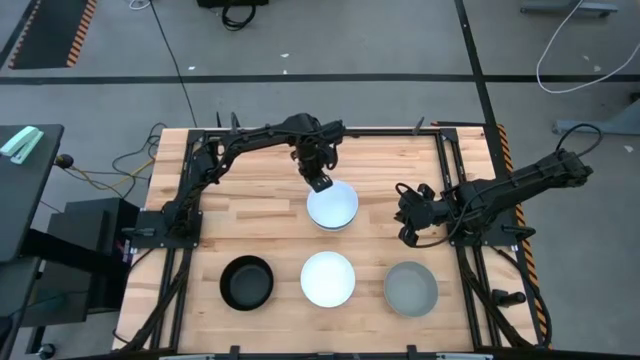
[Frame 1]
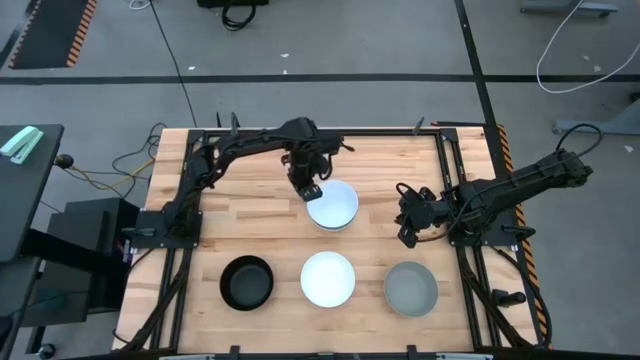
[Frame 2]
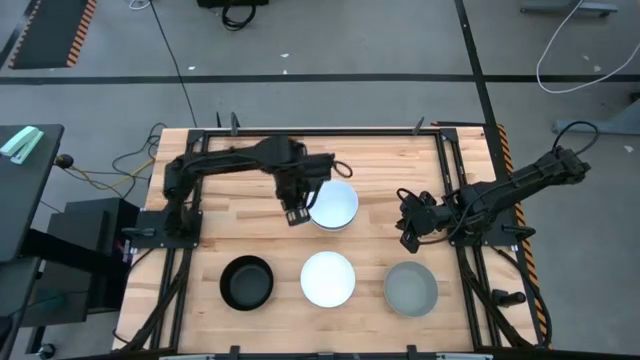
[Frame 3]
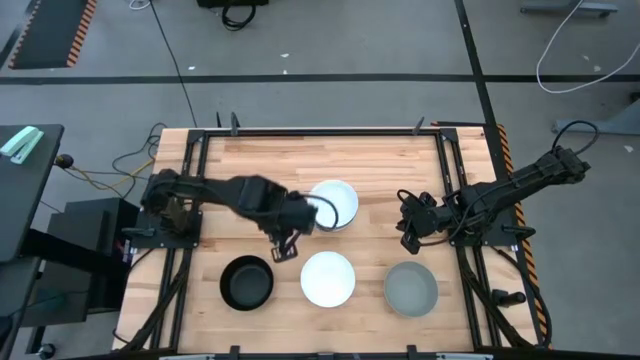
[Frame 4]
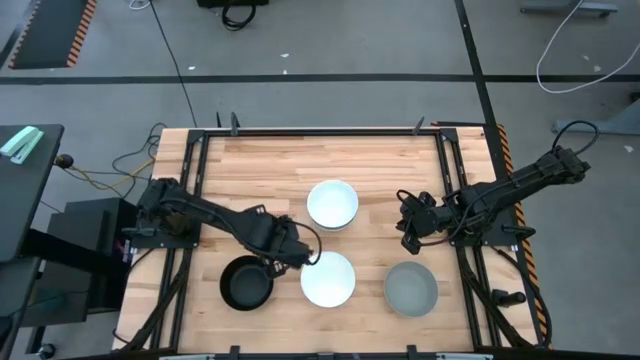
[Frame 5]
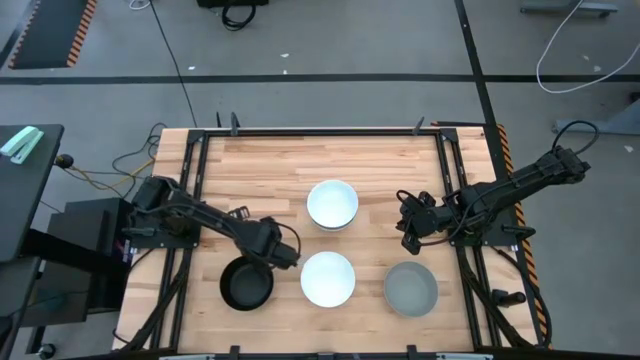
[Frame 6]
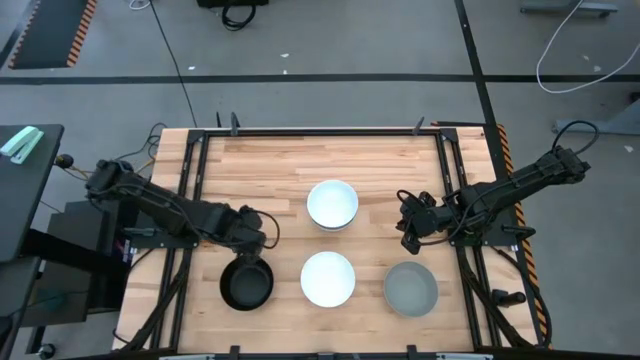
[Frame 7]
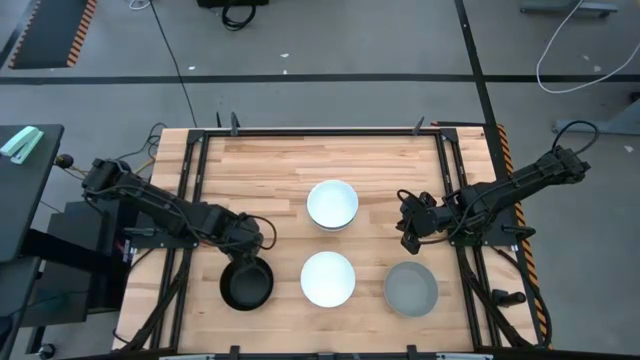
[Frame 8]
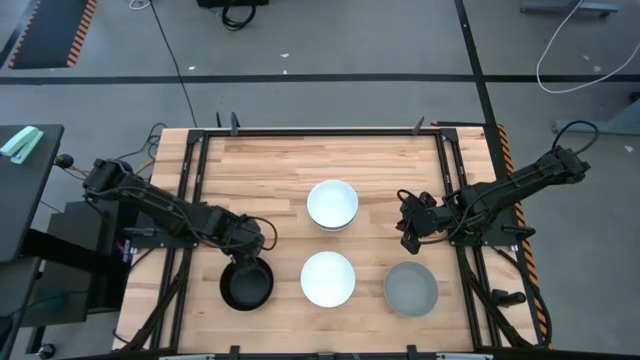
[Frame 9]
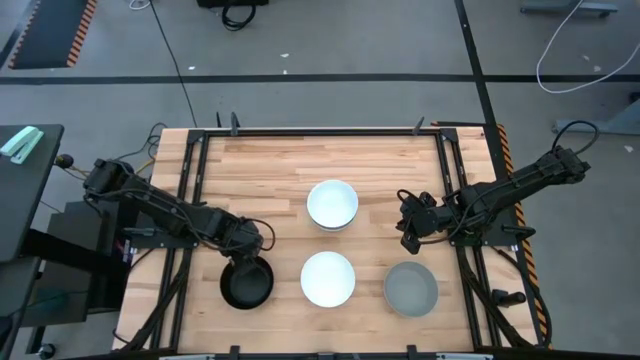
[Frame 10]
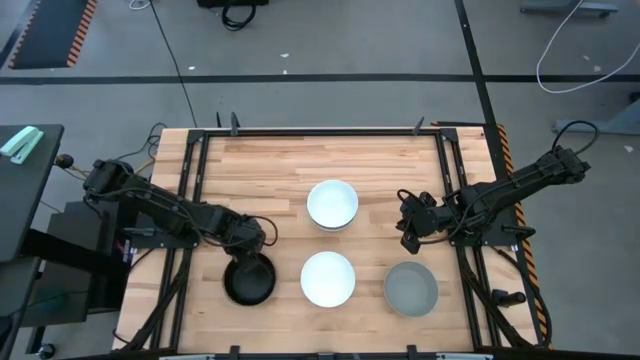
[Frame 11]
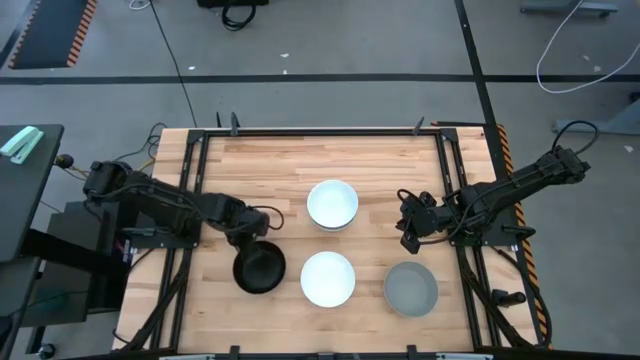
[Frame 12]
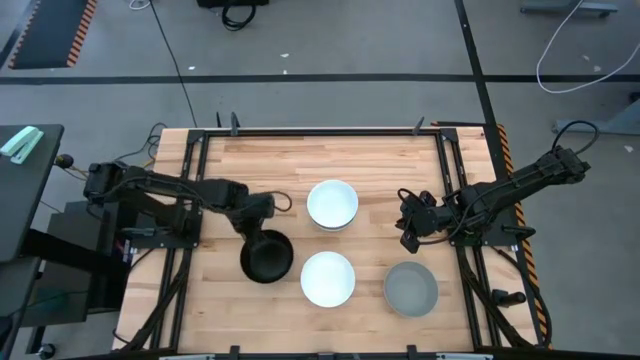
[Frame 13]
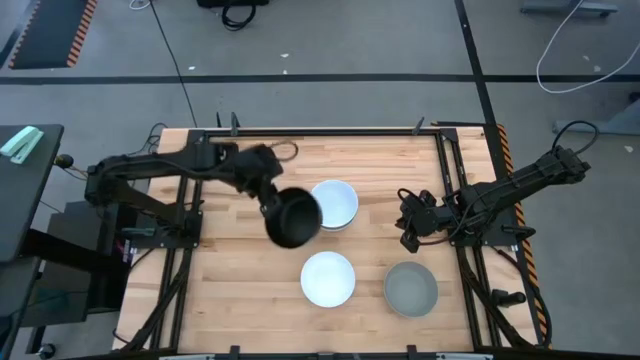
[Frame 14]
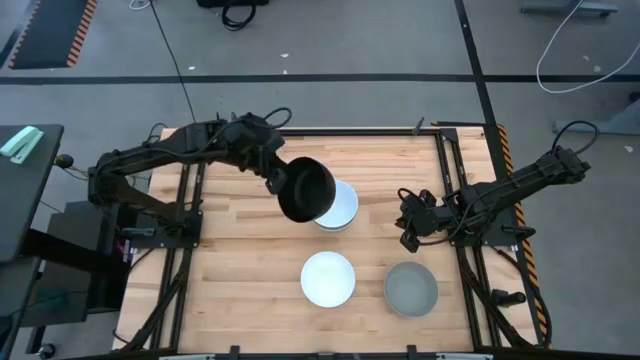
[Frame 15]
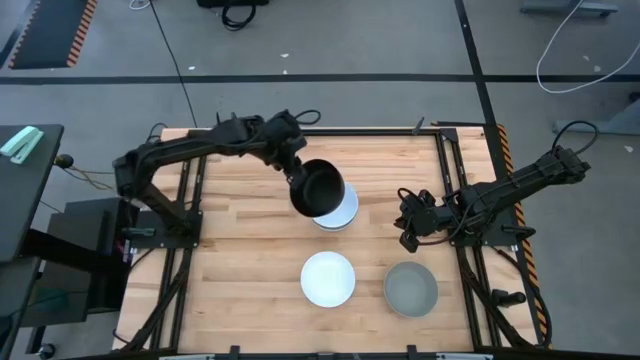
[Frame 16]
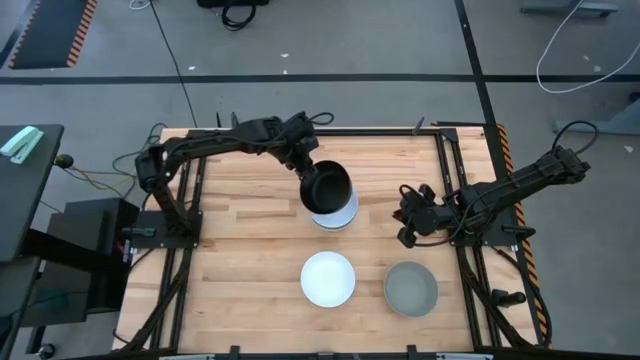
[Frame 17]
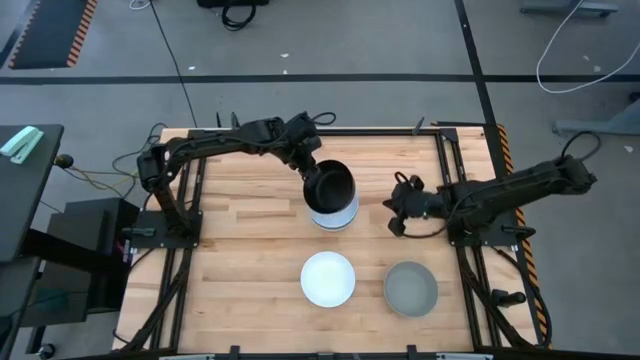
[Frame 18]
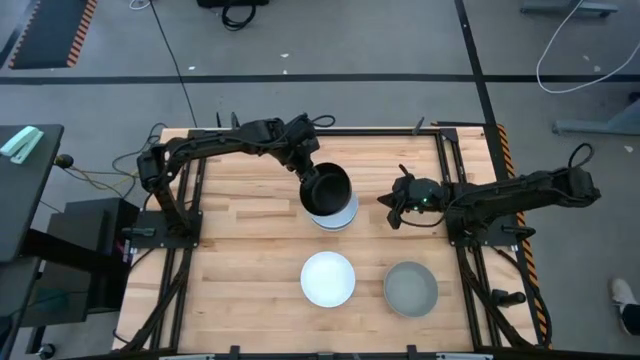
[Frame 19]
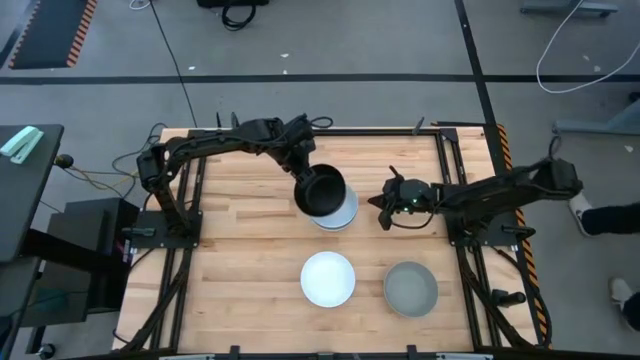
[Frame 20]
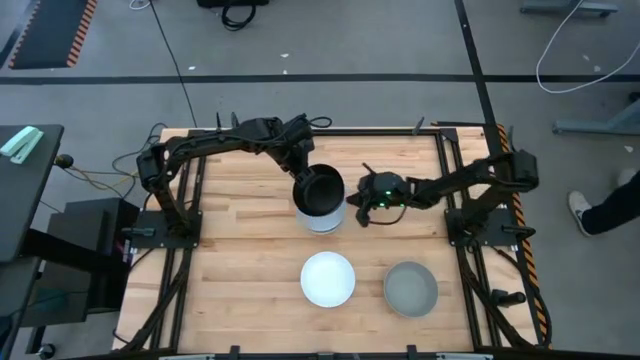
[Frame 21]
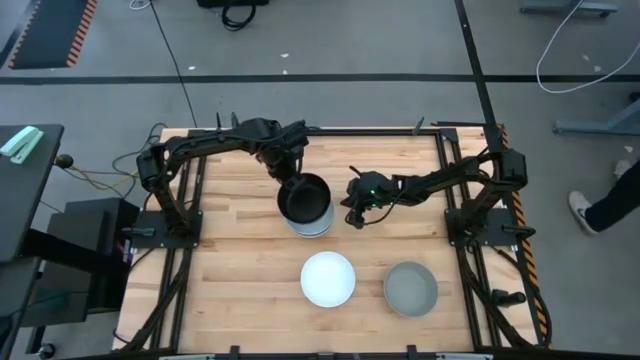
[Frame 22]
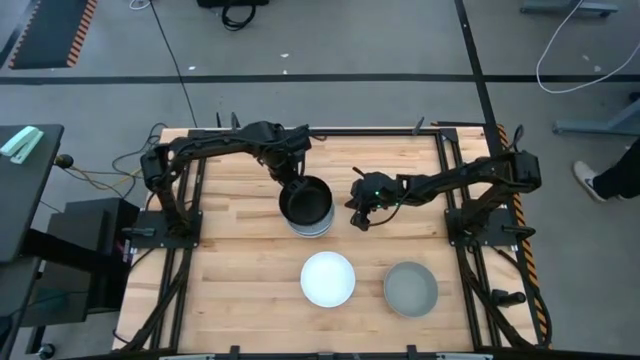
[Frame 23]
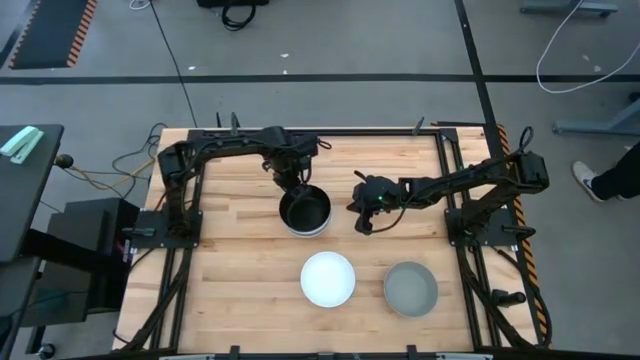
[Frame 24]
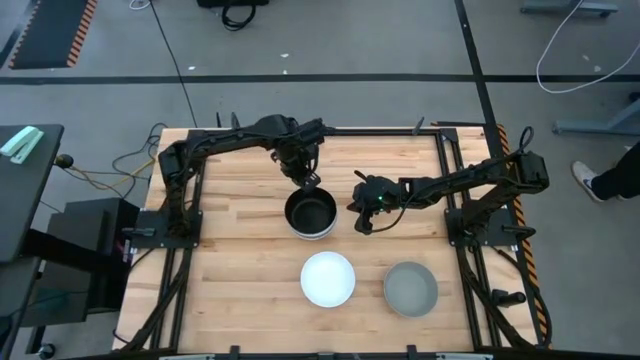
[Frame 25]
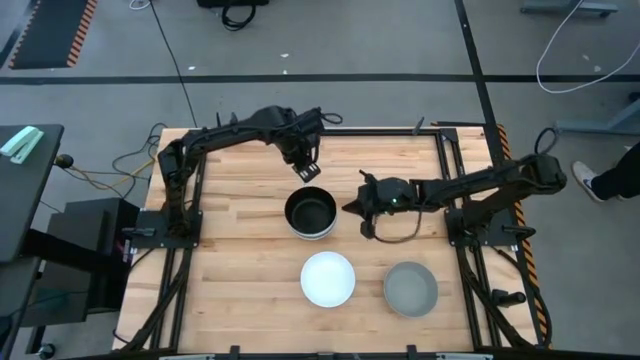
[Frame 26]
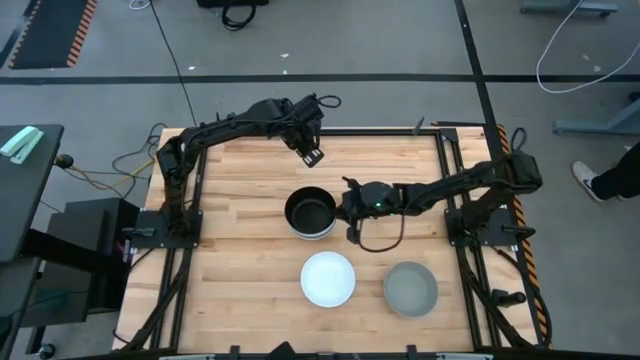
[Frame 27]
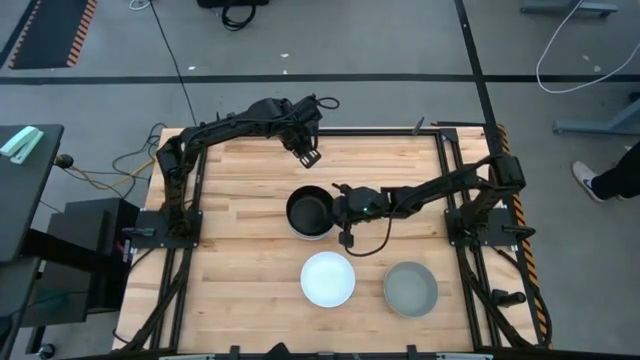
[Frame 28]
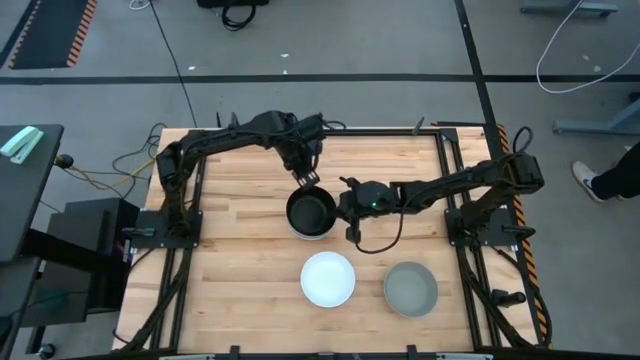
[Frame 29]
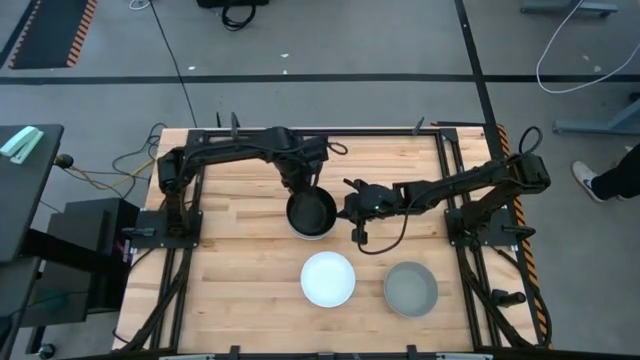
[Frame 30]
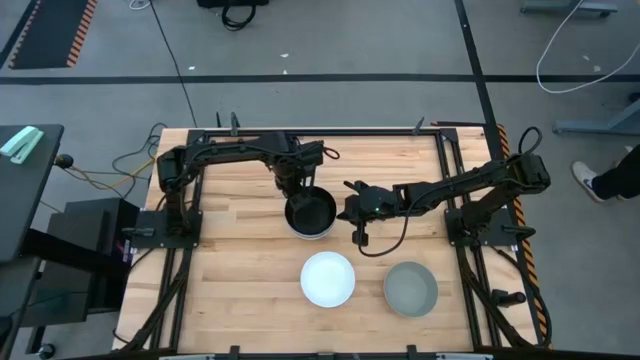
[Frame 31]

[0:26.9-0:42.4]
Task: Nest bowls inside each other
Stack the black bowl on the top white bowl

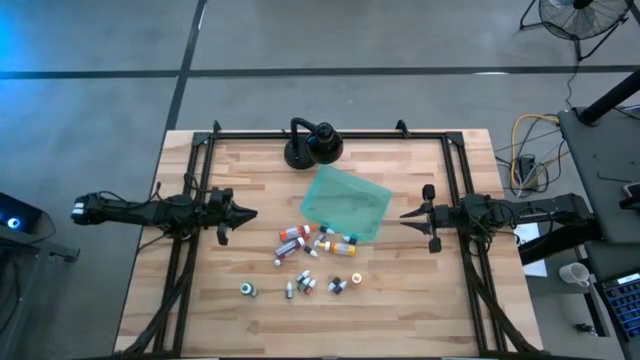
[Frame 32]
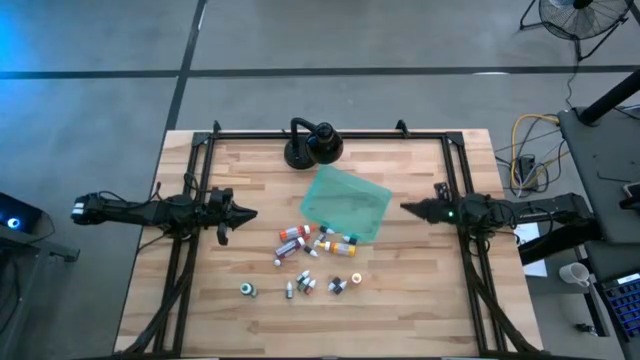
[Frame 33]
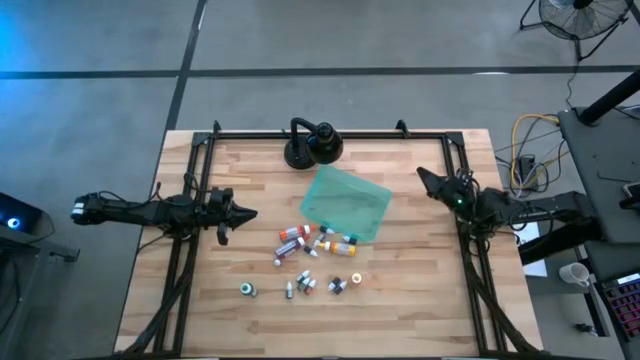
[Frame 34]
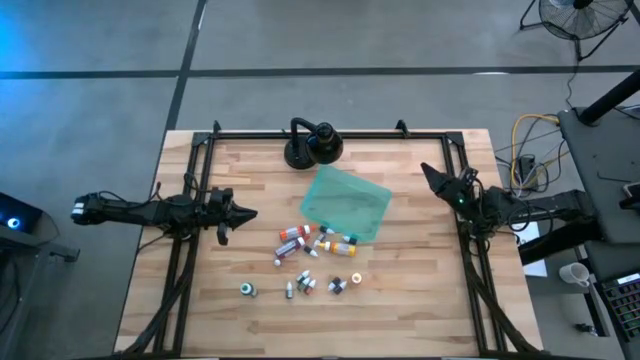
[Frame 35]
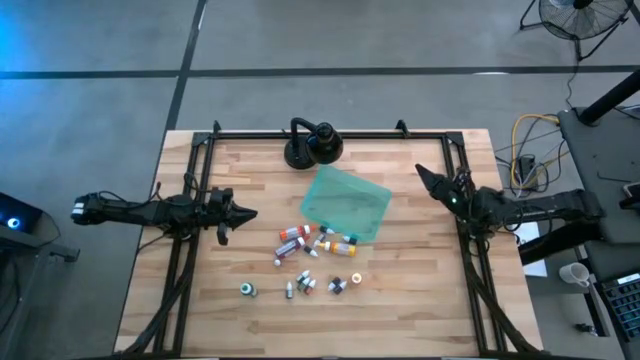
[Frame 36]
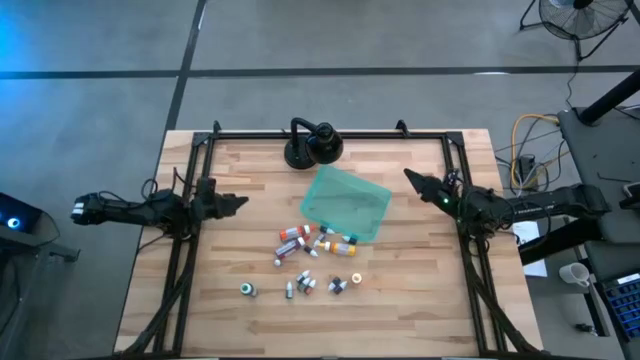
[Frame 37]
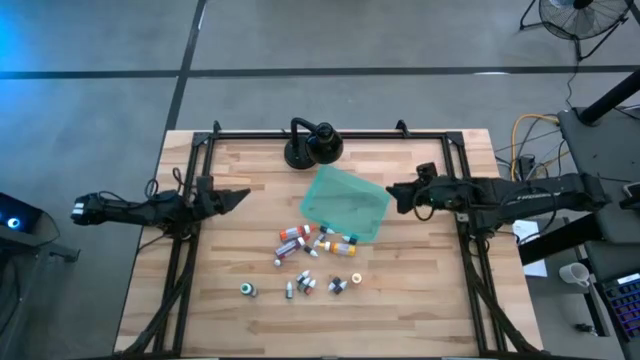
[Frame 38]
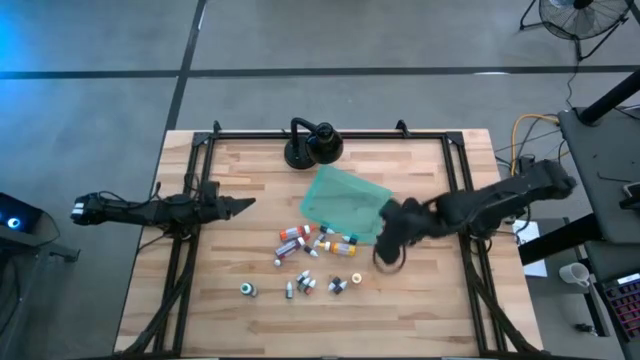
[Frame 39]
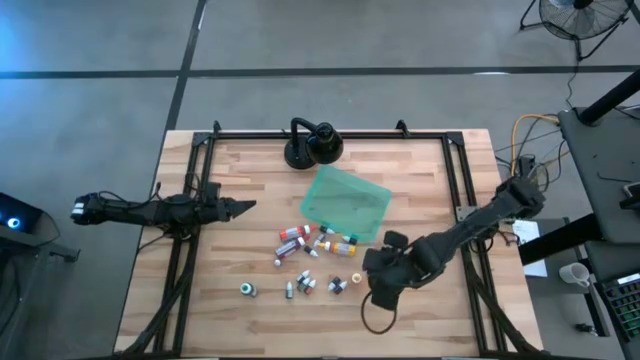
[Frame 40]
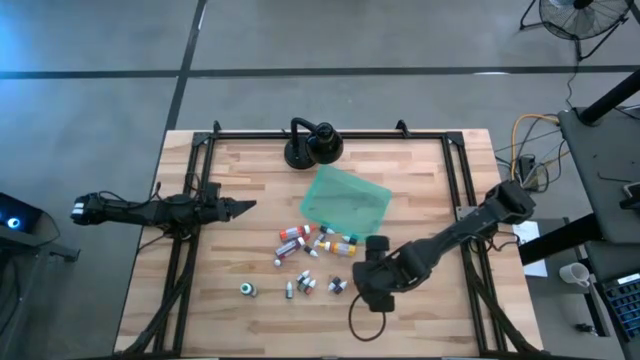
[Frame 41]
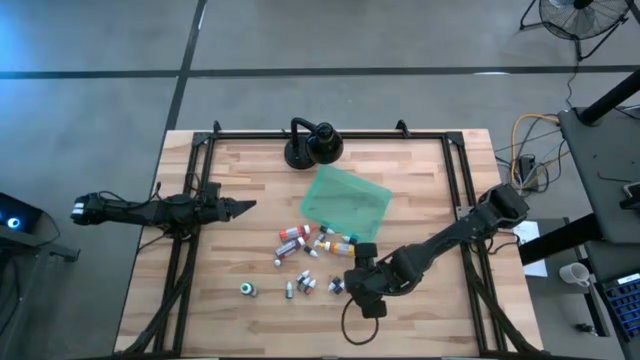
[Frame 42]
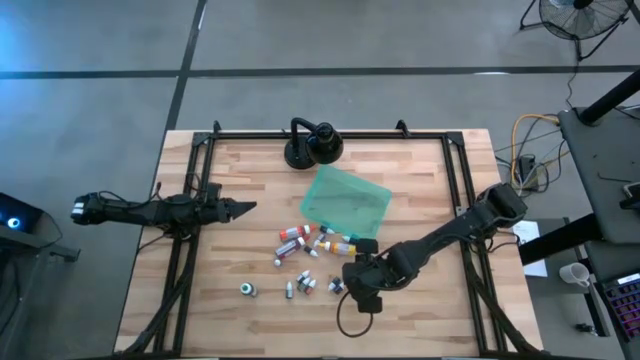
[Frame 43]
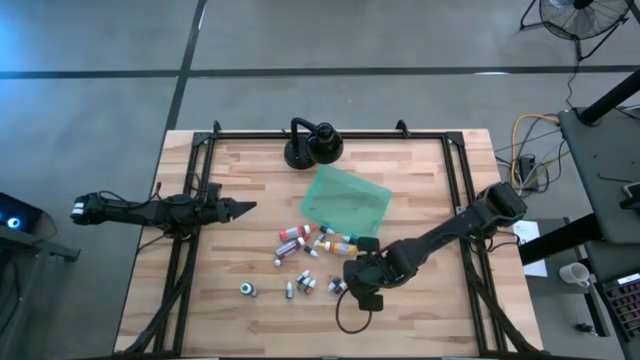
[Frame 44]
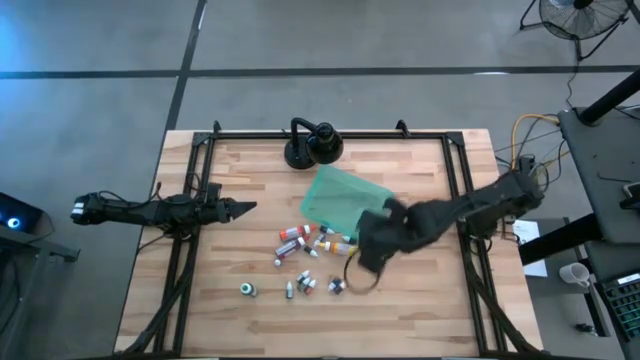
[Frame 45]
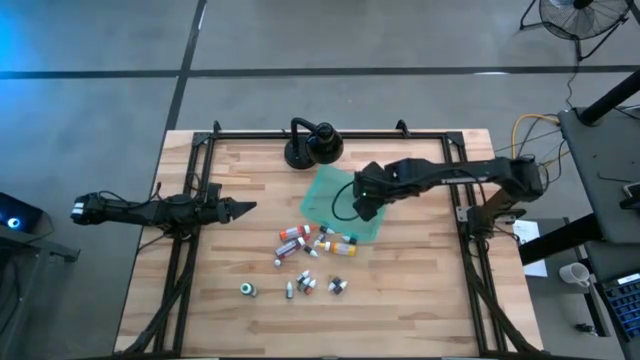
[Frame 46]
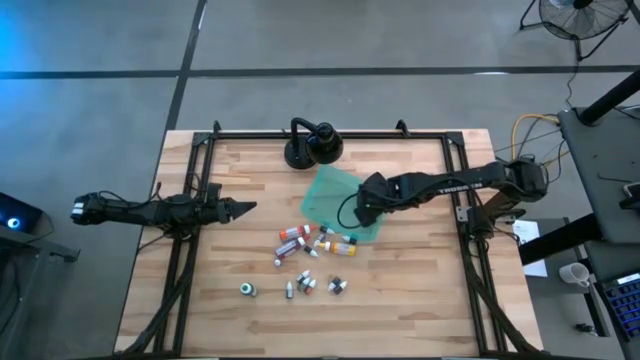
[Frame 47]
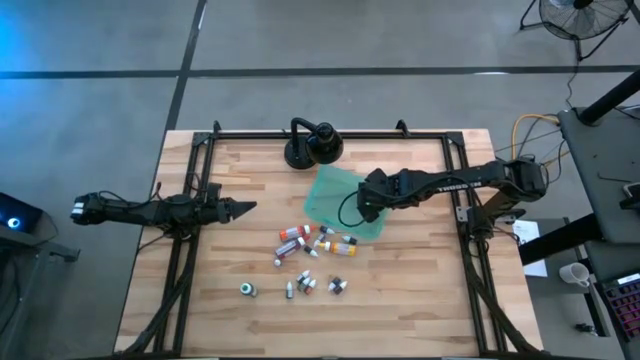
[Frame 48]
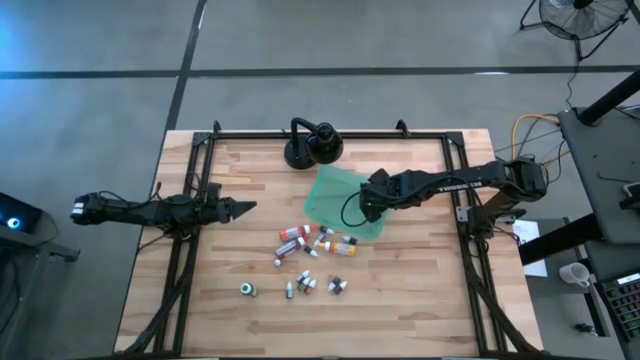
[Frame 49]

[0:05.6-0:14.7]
Task: Pick & Place food coloring
Put the large yellow food coloring bottle into the bin
